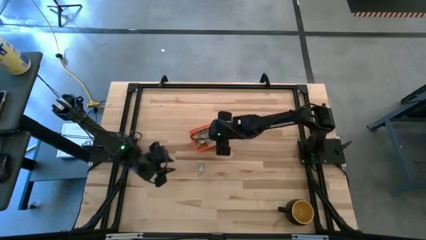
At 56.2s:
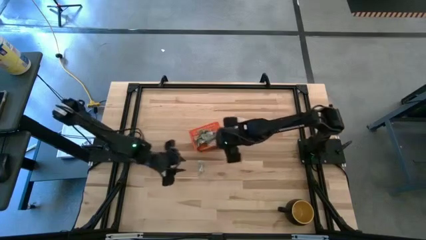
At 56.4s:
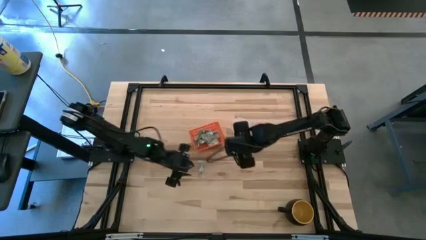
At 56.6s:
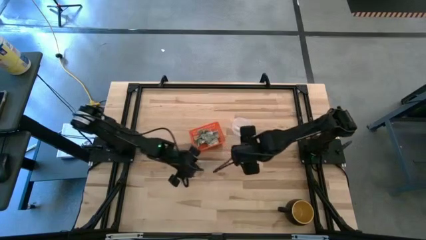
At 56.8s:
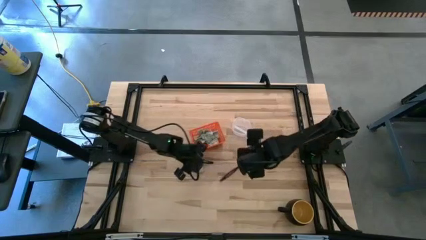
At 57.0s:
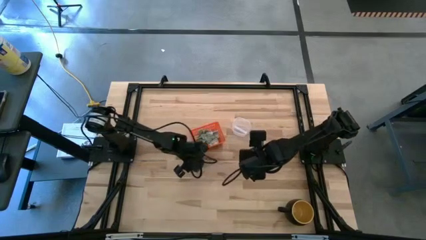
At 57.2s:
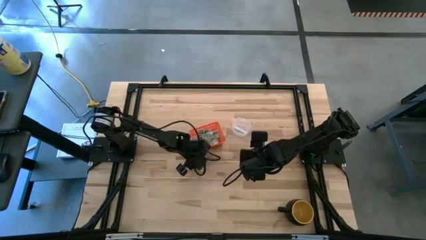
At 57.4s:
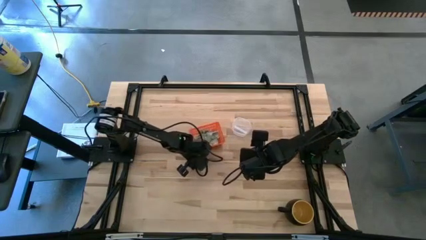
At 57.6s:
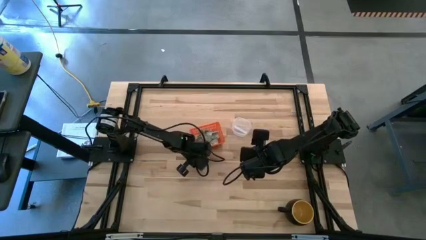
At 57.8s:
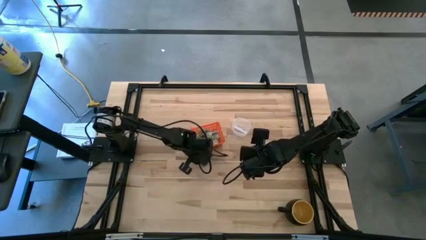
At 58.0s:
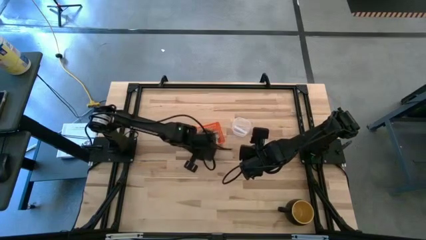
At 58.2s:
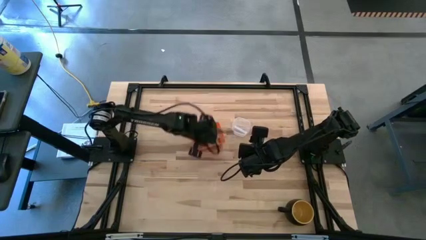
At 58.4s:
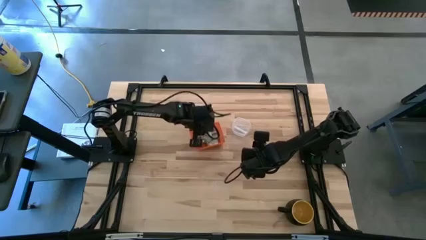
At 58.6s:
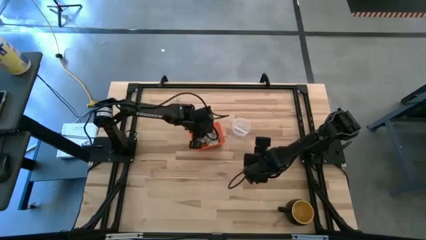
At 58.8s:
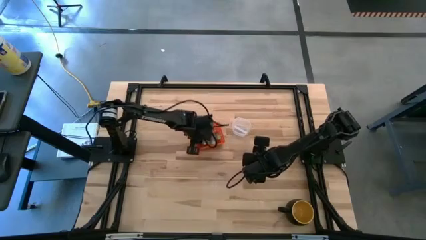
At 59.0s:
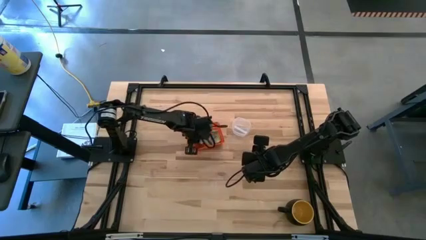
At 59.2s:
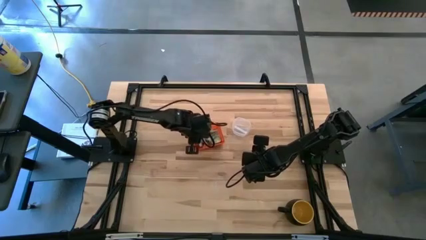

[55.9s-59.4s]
Task: Pick and place Stevia / Truvia into bins
Put the stevia packet into the basket

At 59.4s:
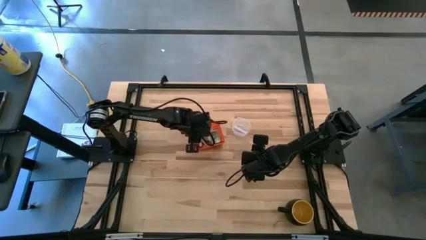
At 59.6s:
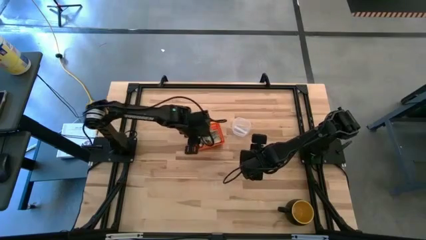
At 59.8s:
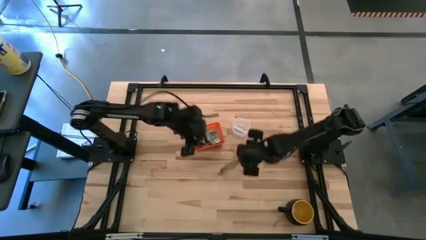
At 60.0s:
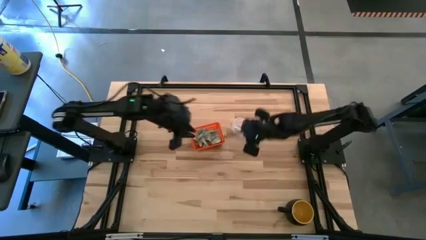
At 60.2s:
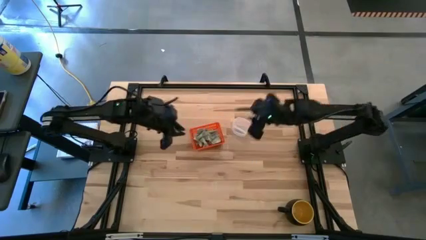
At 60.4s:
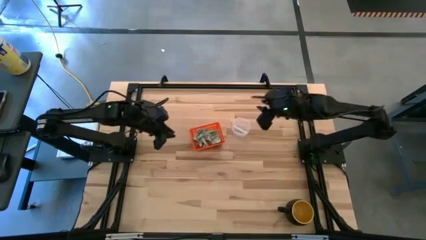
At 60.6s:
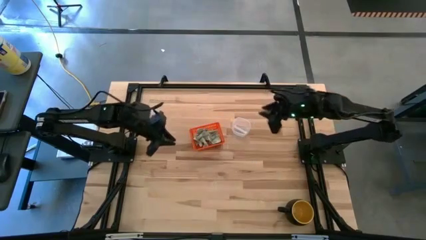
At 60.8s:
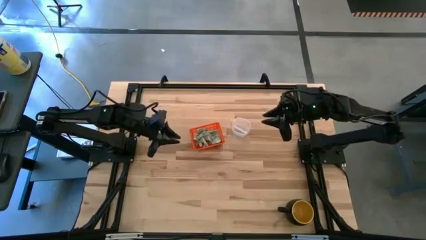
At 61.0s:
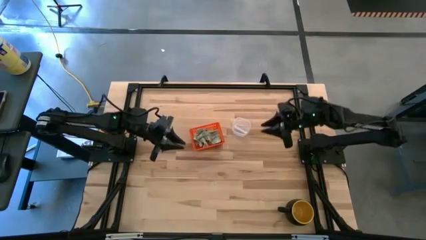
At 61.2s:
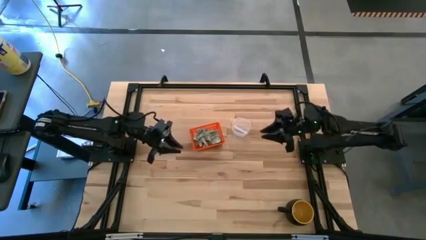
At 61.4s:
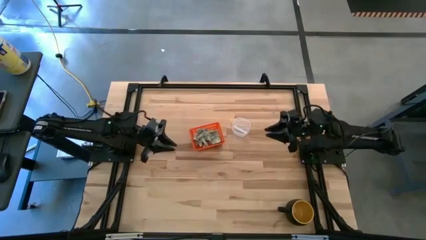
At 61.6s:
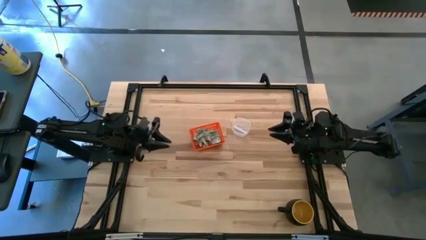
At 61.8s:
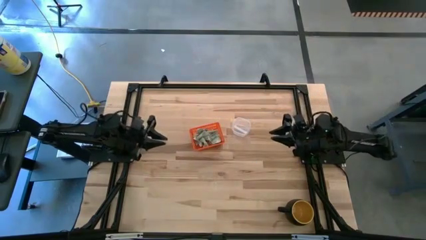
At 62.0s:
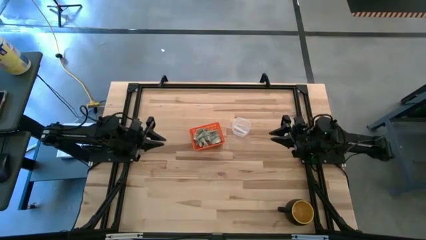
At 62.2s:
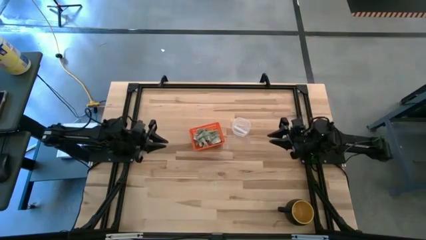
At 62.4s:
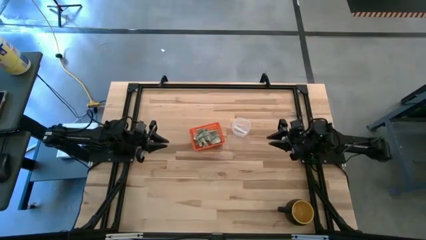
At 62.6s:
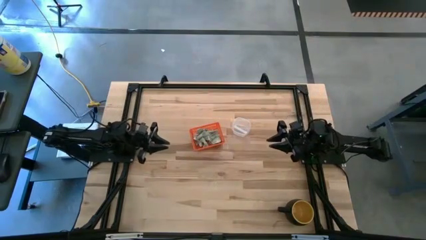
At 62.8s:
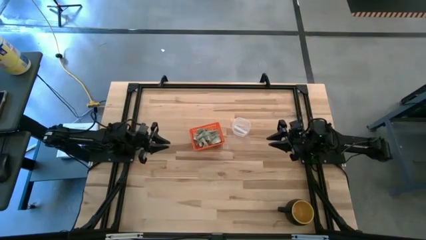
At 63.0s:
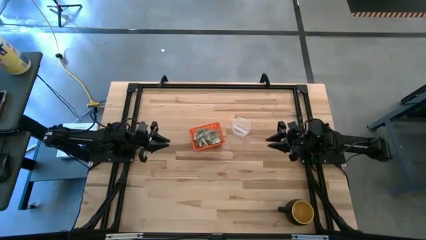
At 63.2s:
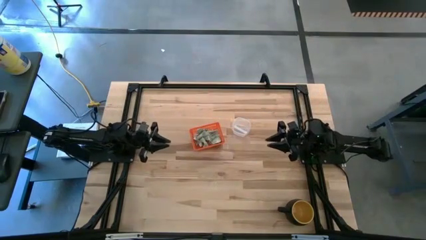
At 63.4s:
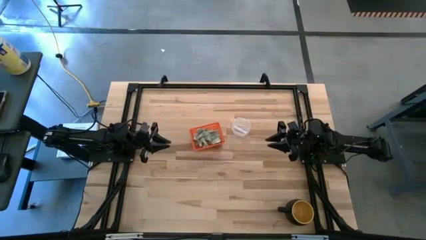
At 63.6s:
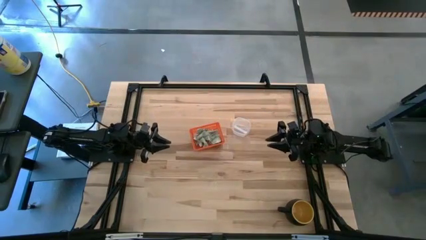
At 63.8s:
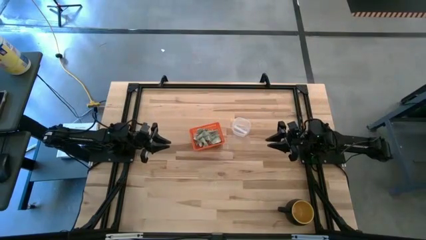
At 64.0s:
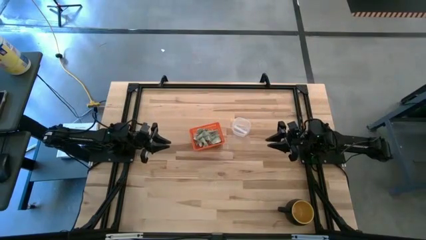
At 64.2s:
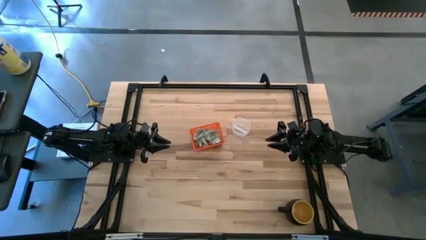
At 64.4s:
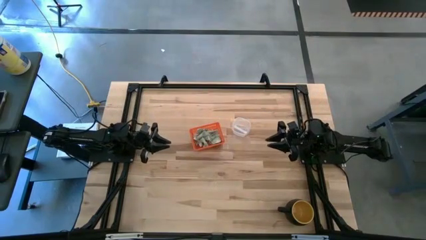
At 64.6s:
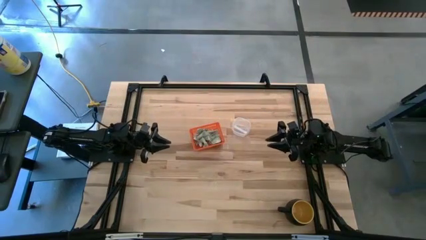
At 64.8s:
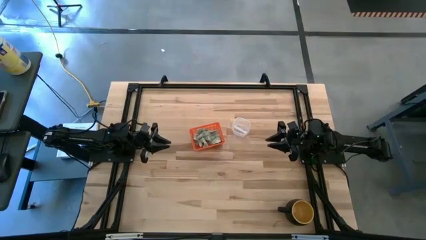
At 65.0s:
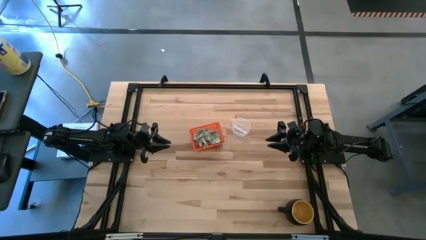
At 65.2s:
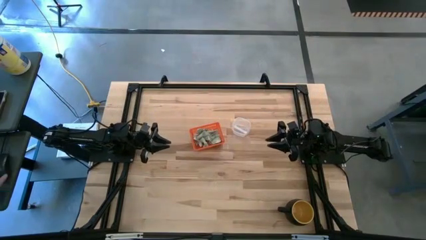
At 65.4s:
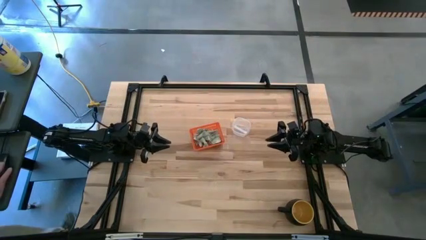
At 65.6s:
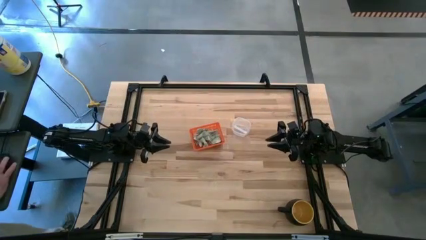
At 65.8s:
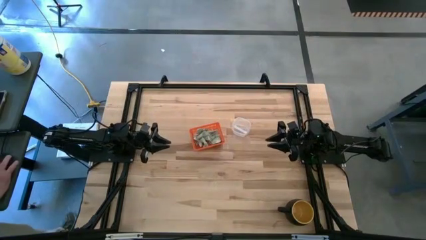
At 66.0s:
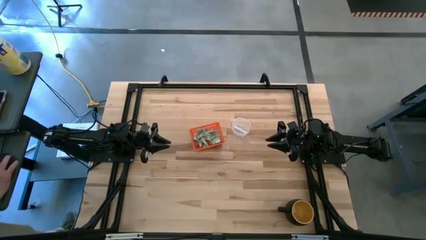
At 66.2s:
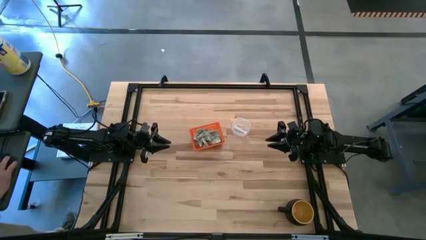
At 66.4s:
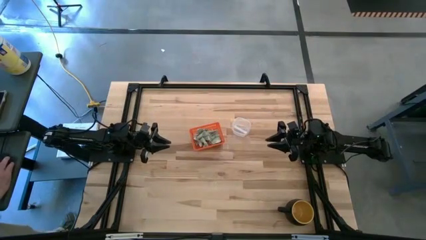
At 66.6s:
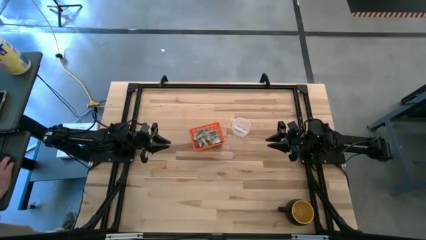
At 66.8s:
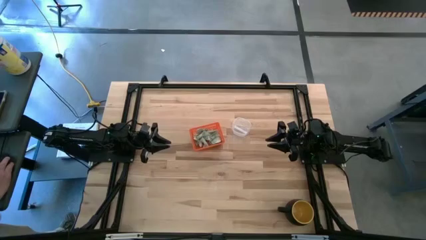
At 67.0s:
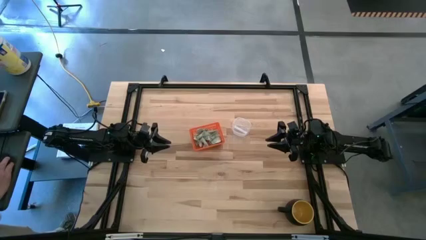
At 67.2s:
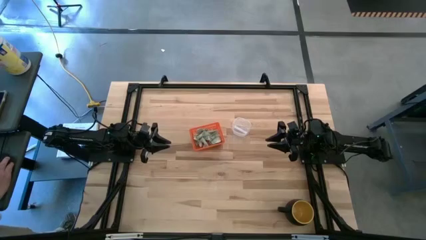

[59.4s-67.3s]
Return to home position

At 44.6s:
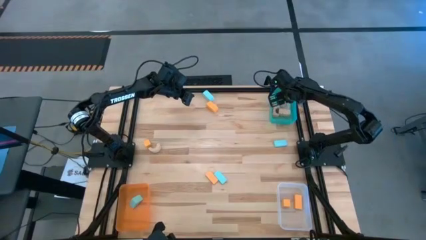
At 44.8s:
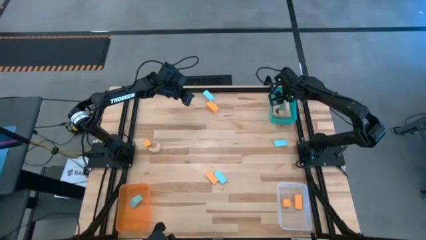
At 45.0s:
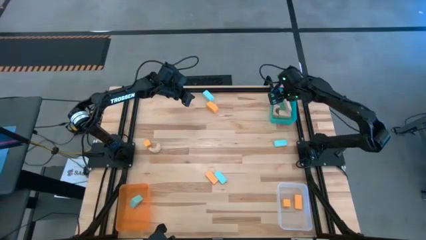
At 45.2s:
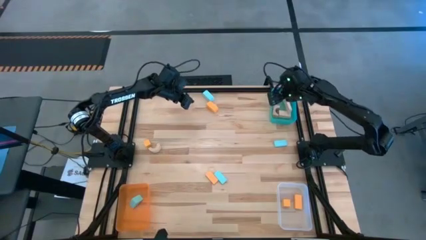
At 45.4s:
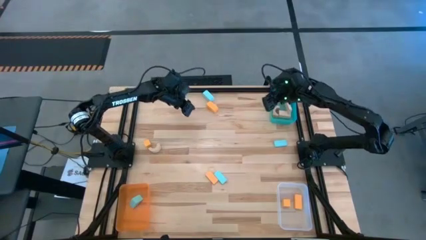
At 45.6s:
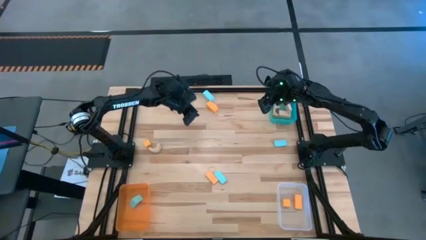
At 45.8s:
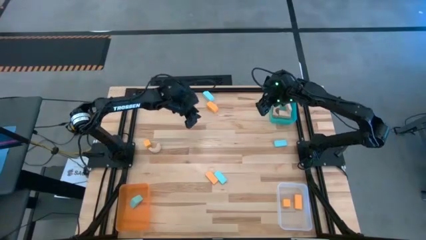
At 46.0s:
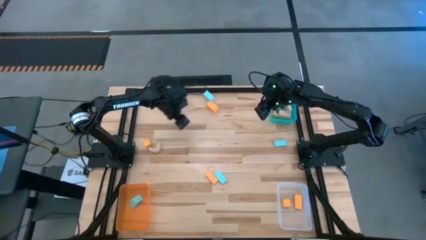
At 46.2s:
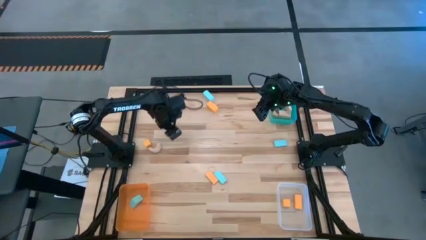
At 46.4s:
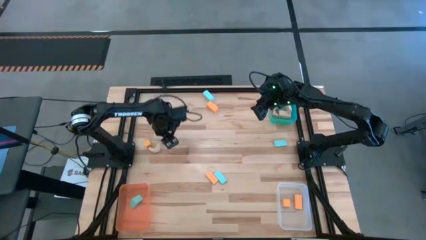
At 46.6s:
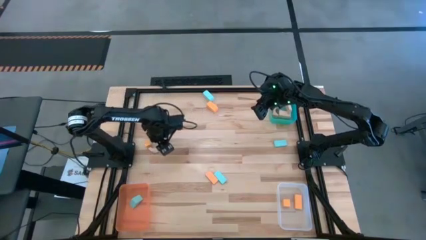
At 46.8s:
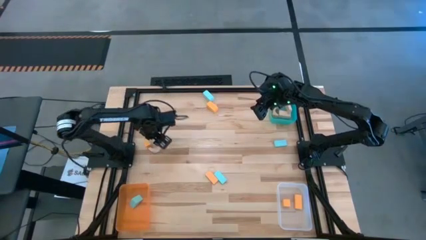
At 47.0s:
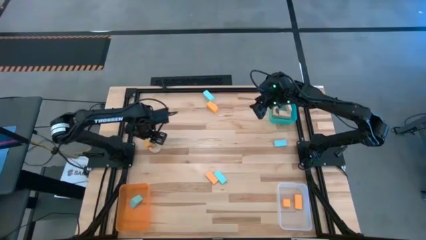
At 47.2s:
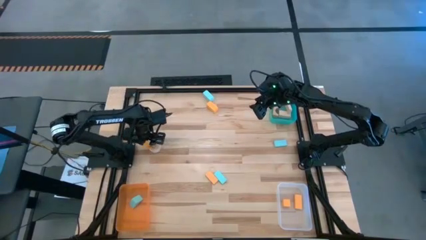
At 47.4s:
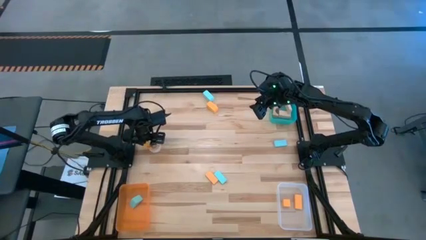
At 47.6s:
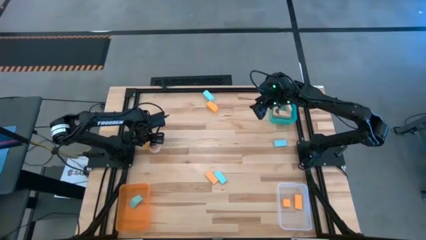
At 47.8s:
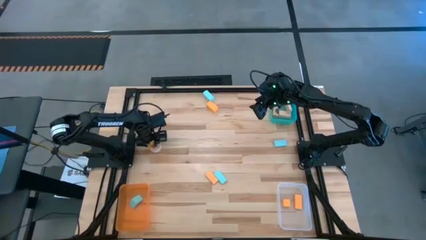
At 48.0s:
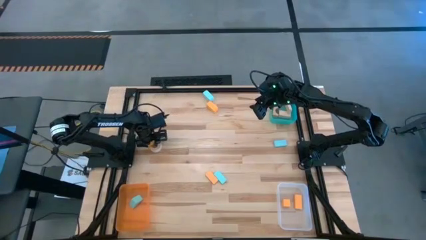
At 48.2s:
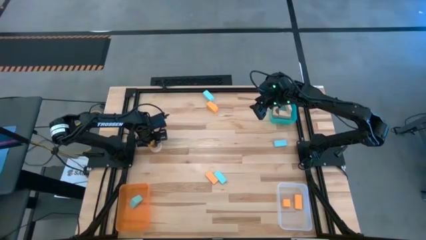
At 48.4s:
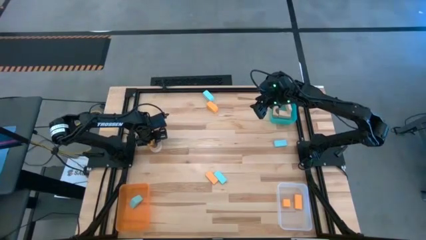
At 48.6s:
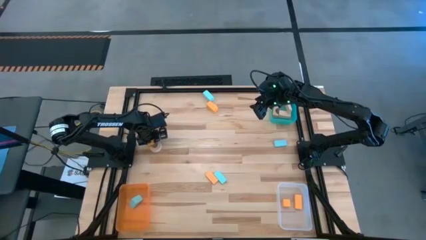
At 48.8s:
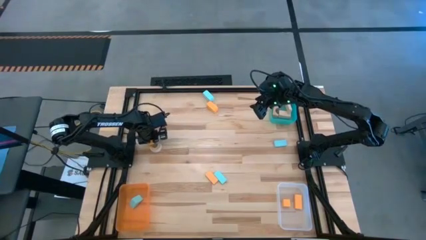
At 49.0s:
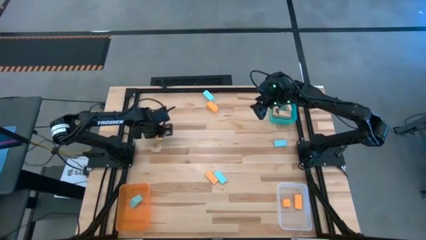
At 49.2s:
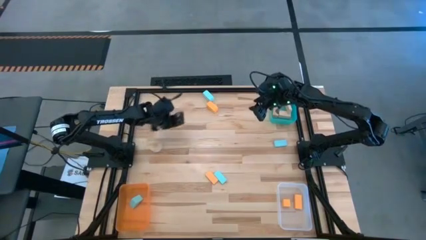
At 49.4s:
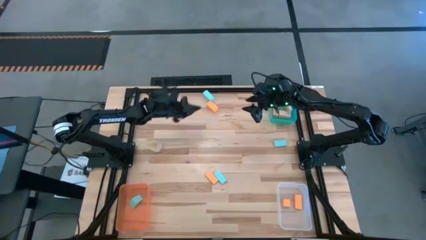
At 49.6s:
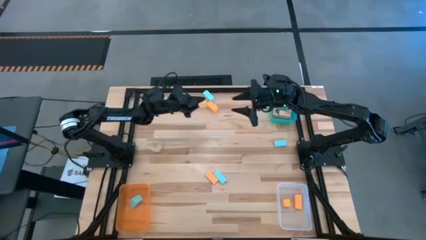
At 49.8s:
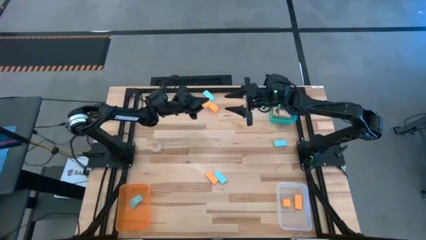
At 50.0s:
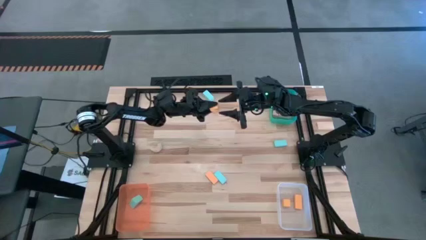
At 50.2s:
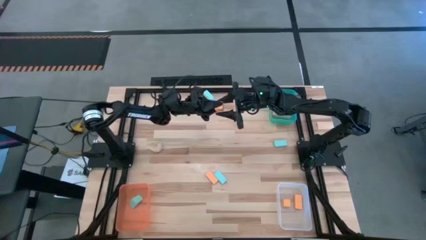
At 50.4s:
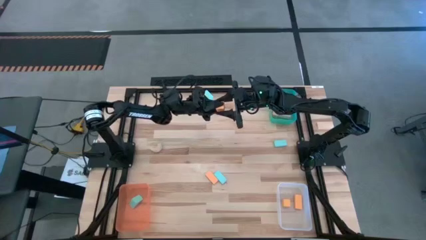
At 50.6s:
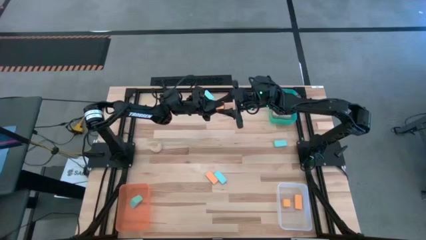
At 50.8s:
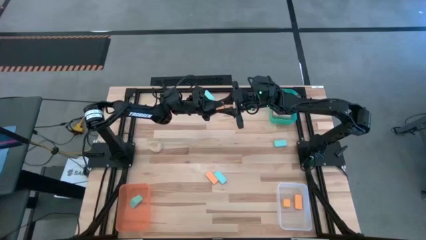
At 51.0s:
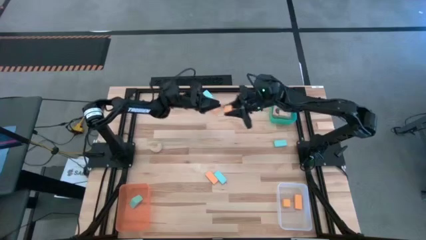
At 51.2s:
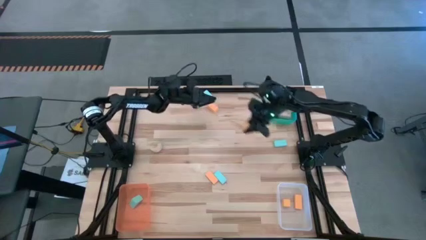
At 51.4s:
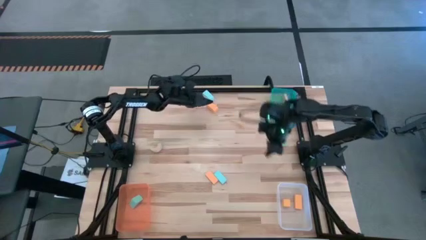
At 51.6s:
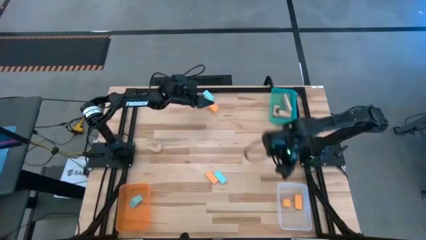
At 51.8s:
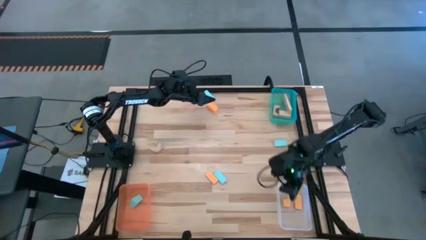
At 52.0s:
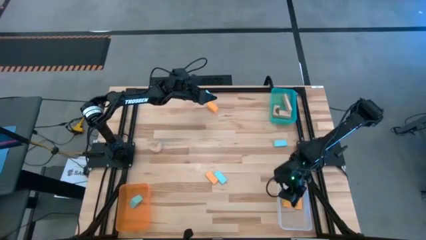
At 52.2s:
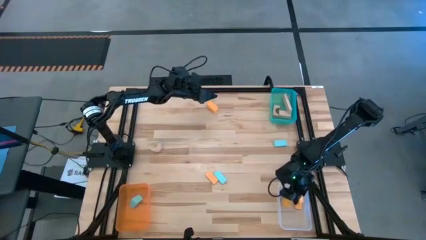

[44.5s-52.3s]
Task: Sort & place blocks by color
Put the yellow block into the transparent bin
